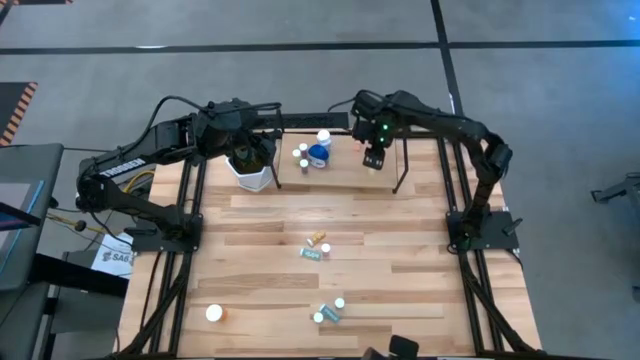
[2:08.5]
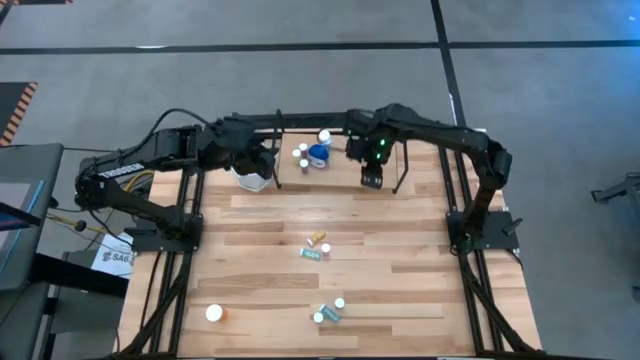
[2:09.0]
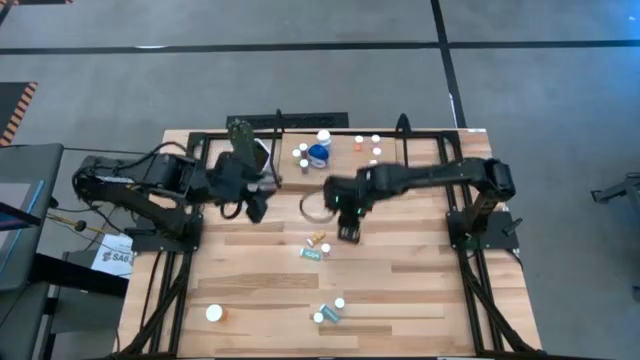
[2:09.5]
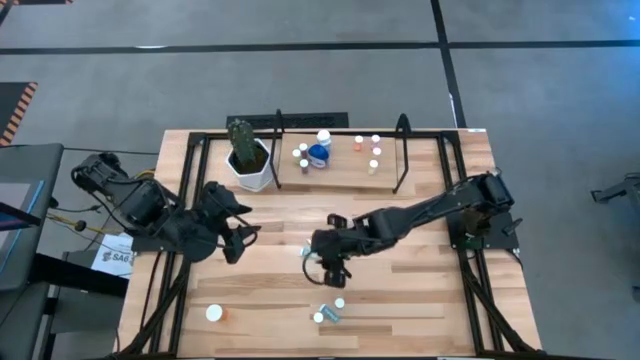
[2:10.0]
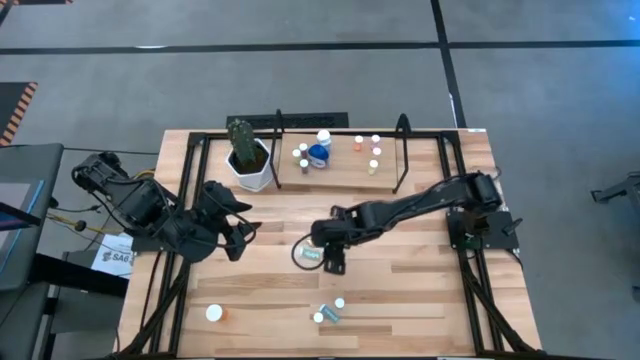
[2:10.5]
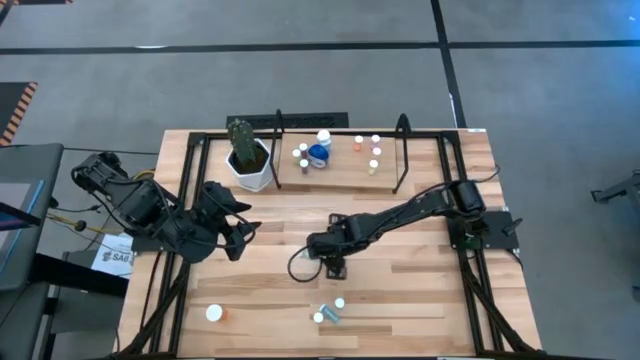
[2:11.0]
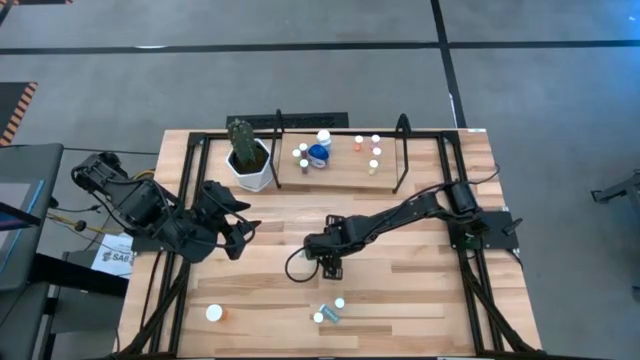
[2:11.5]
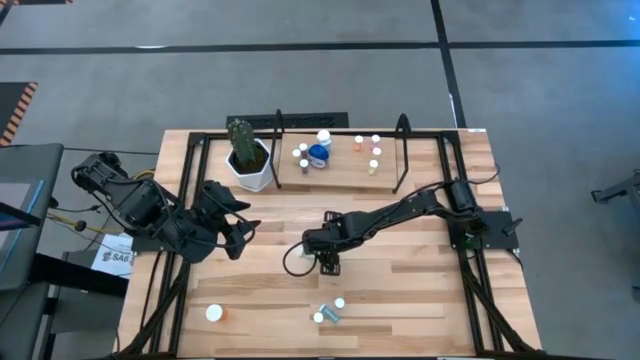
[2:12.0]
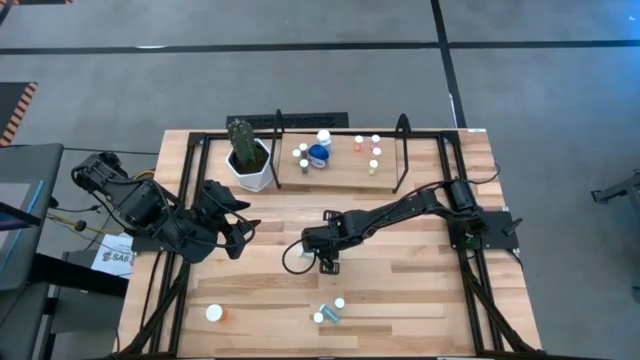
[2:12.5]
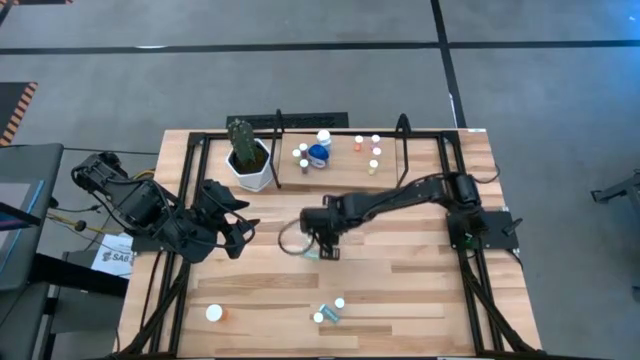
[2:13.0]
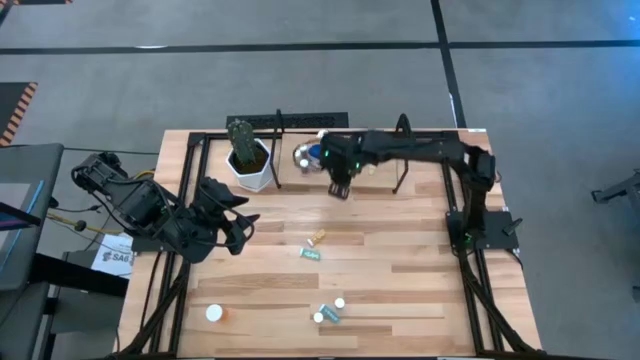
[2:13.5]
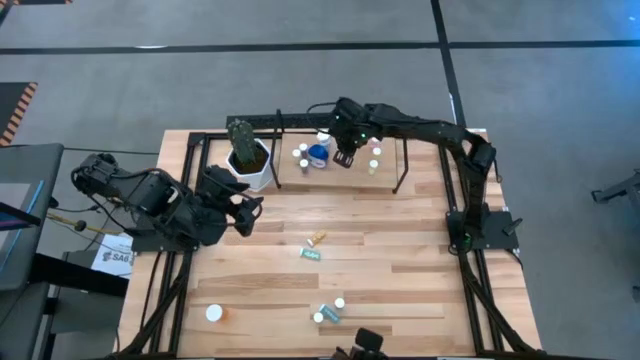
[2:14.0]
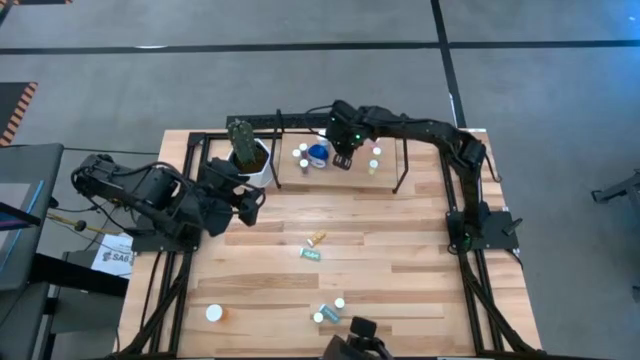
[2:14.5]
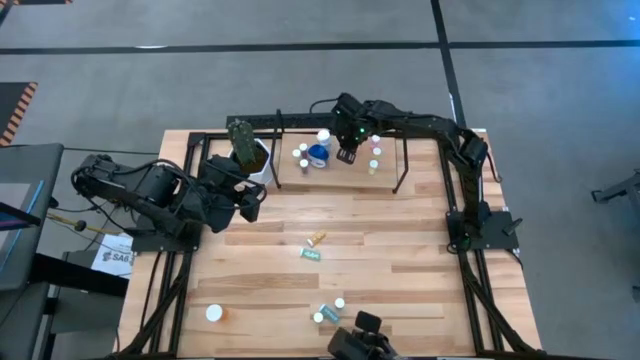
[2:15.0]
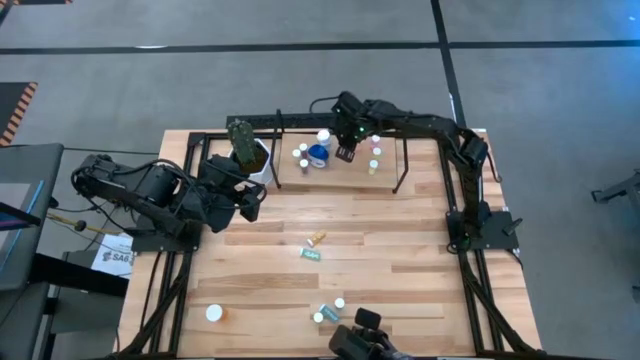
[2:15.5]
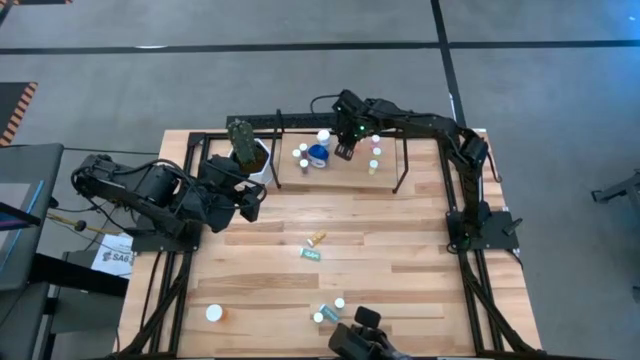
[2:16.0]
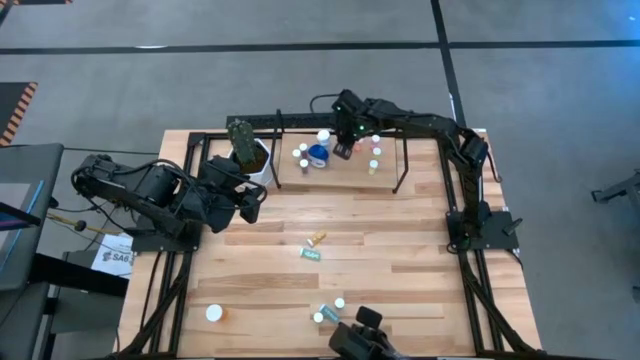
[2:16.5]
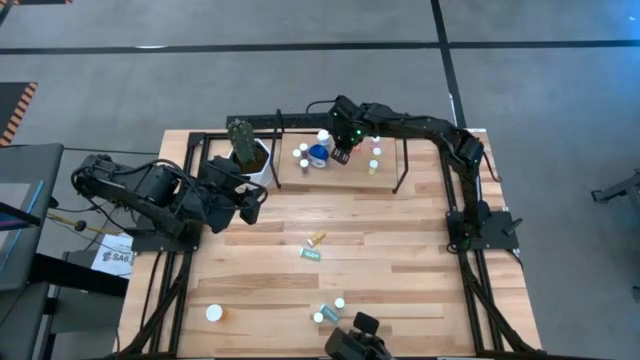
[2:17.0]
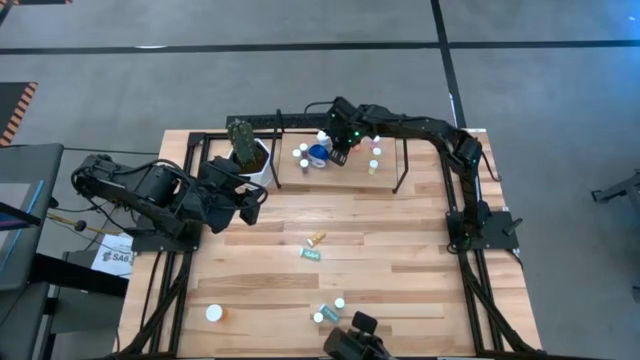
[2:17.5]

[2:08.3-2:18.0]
Task: Pick and place medicine bottles onto shelf by color
Put the pink pill bottle on the shelf

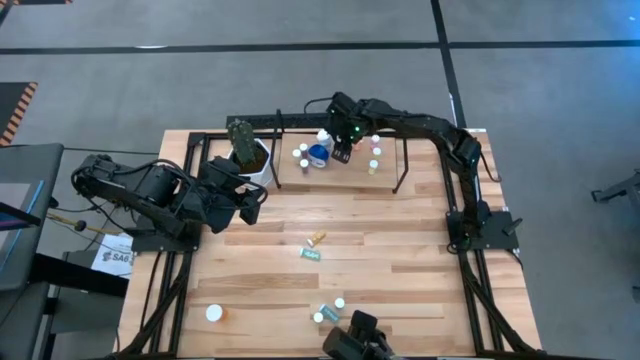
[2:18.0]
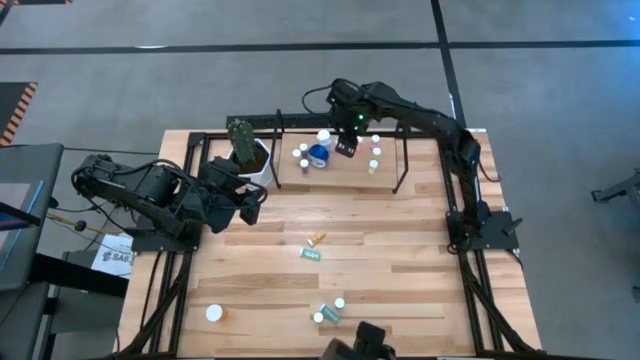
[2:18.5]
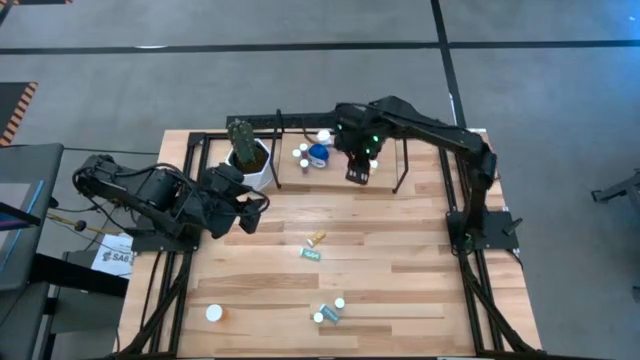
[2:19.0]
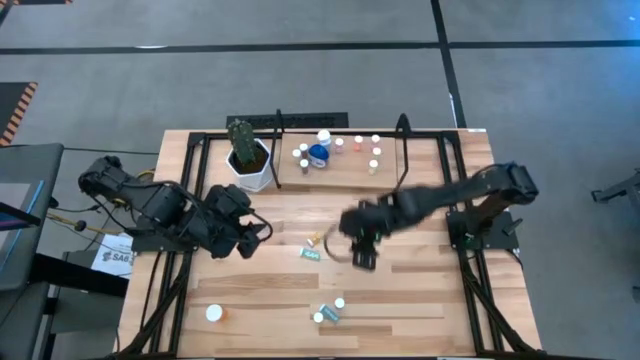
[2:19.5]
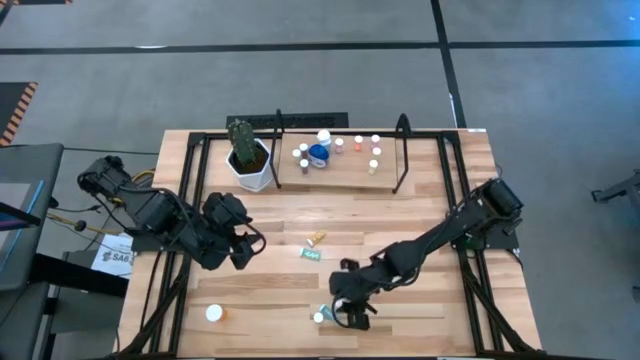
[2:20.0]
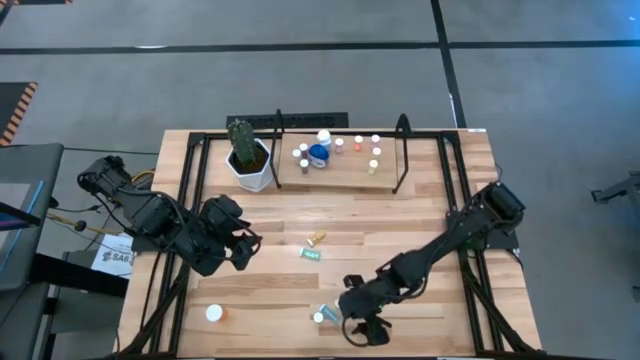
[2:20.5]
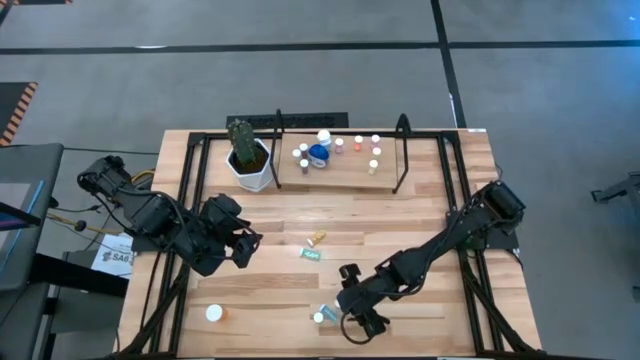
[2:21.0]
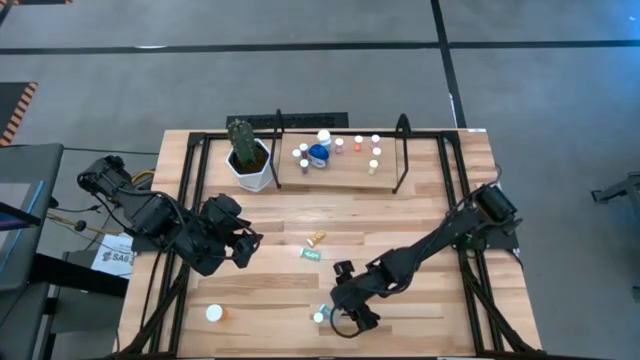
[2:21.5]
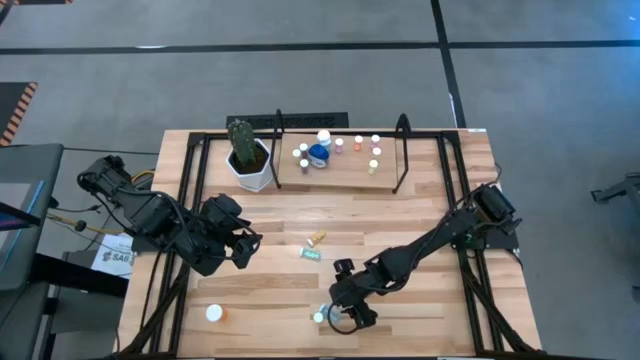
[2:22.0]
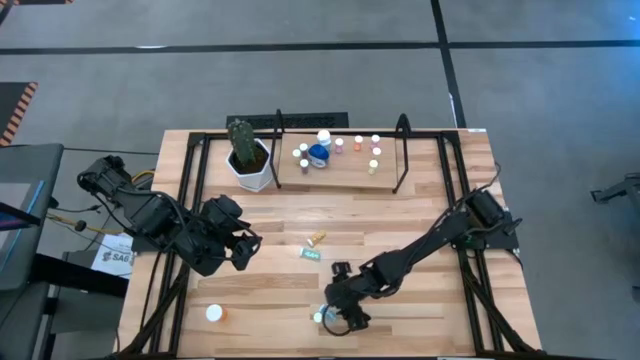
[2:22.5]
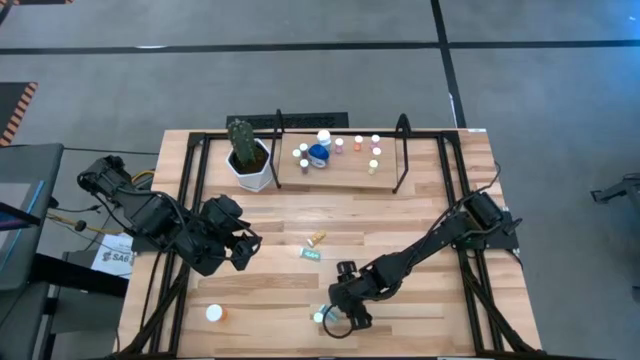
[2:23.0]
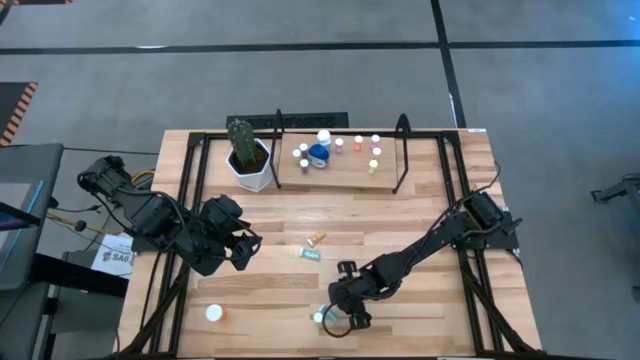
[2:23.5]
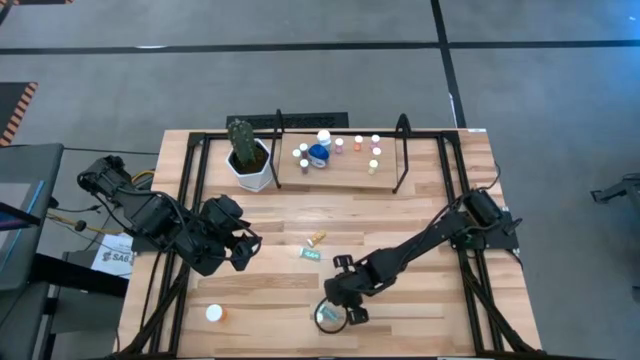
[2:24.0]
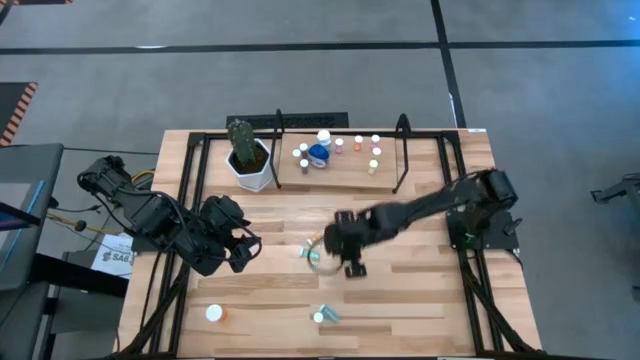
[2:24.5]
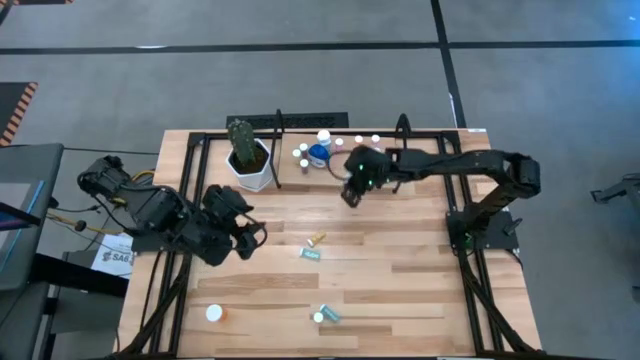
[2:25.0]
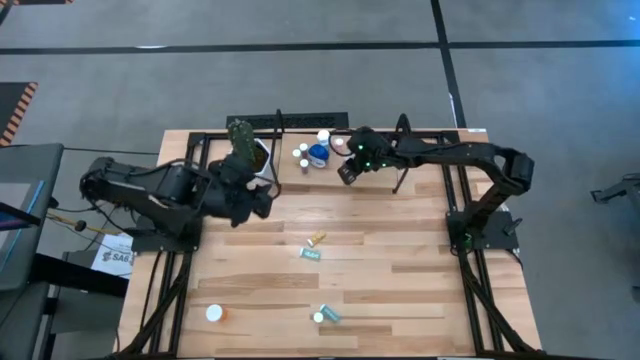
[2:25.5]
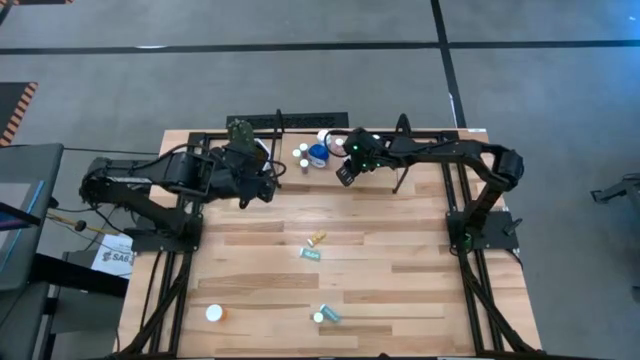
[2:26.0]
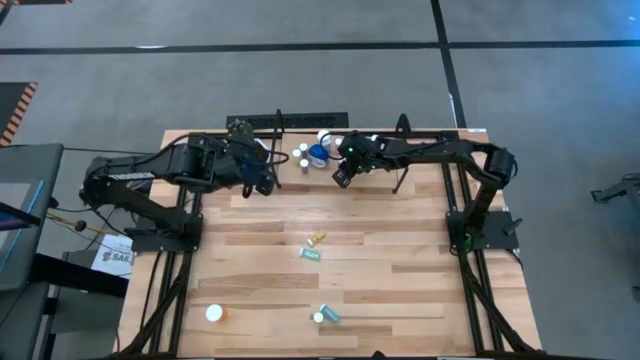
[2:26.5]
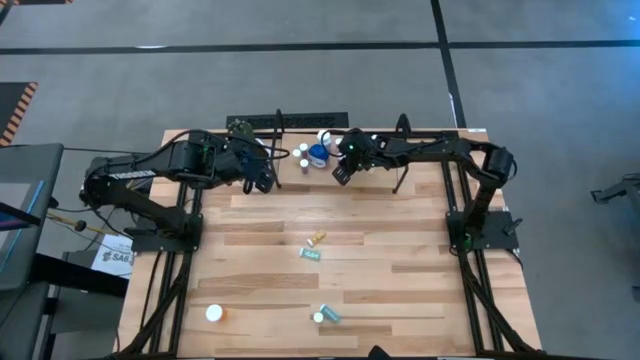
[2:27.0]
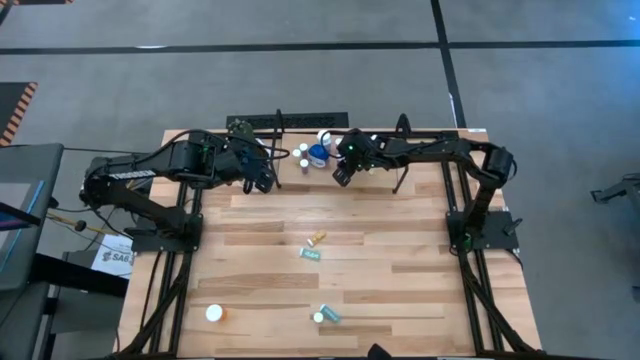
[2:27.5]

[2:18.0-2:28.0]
Put the small blue pill bottle on the shelf

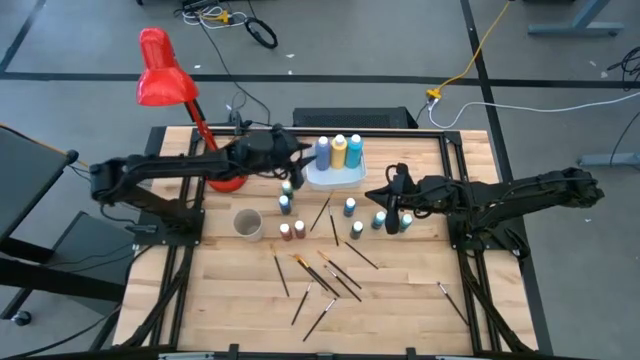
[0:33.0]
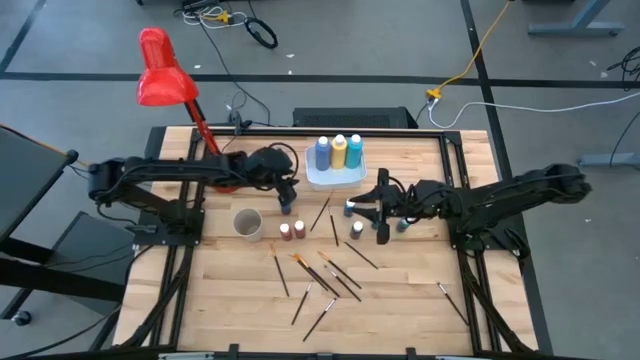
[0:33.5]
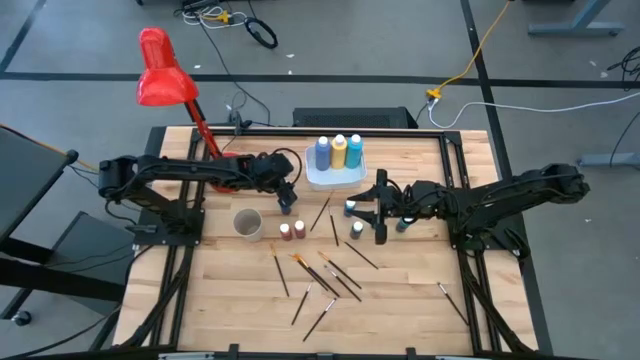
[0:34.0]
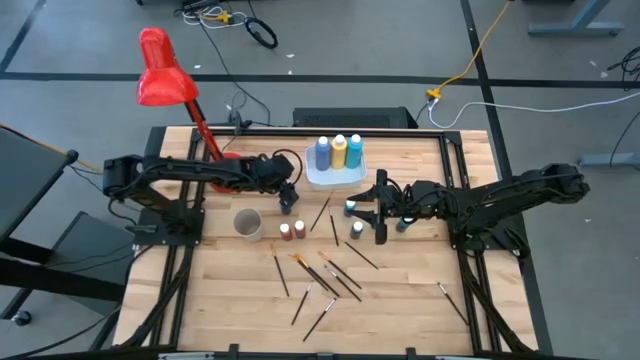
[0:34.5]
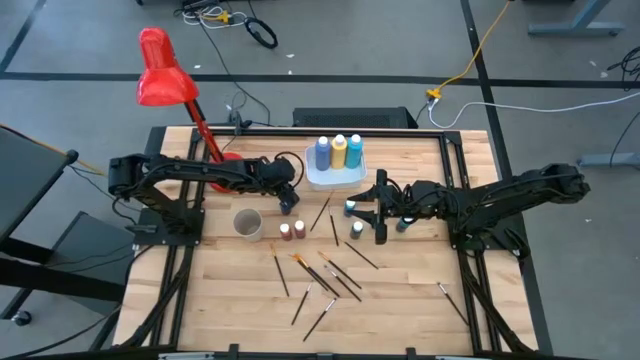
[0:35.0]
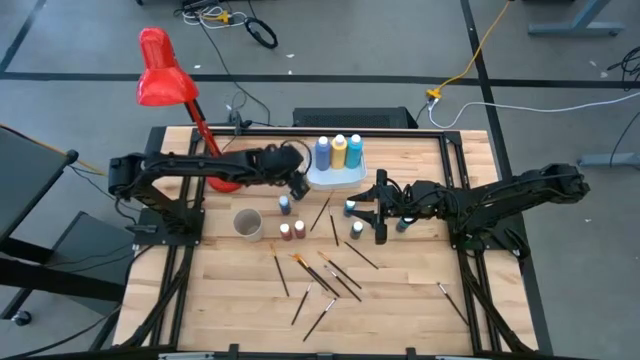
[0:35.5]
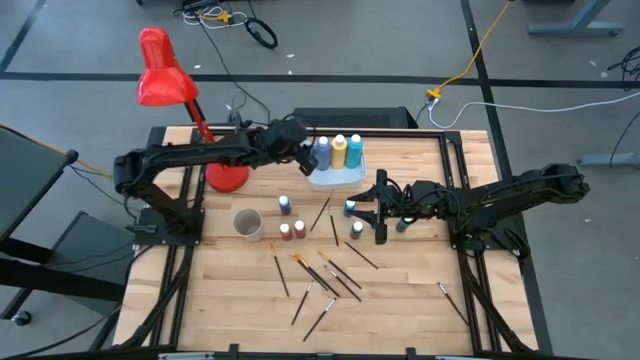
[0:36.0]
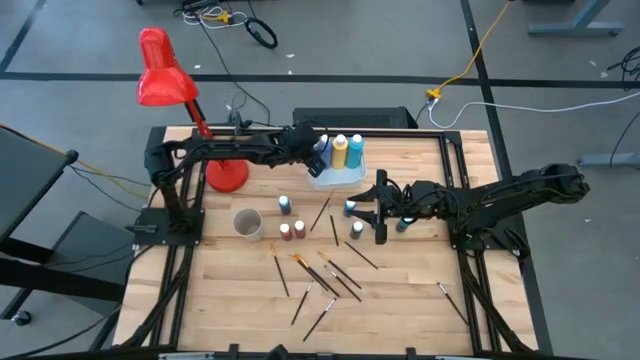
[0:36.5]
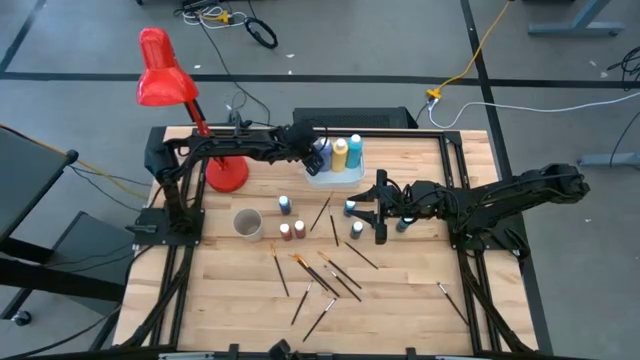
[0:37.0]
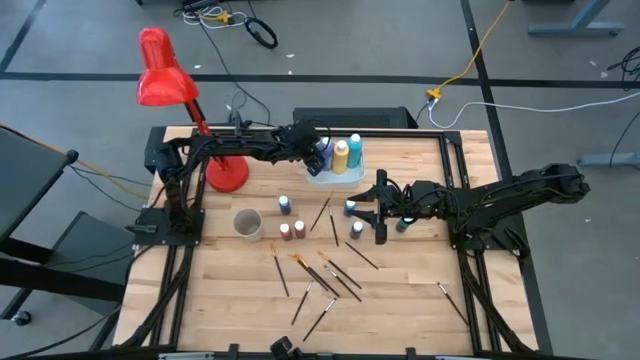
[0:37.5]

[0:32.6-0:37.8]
Task: Pick & Place Paint Supplies
Put the small green paint bottle into the white bin
